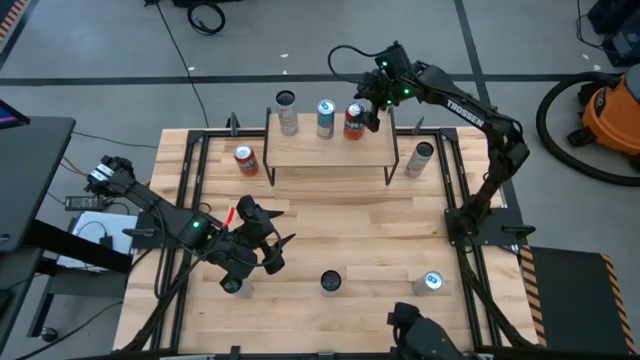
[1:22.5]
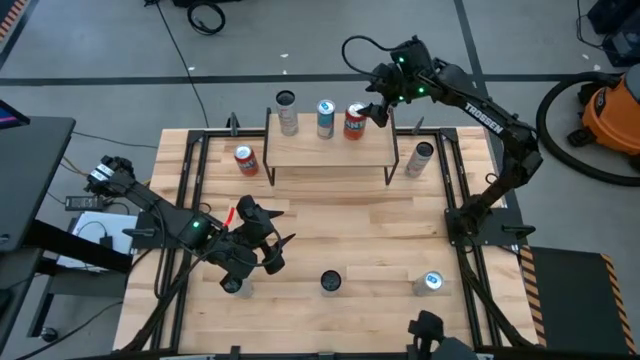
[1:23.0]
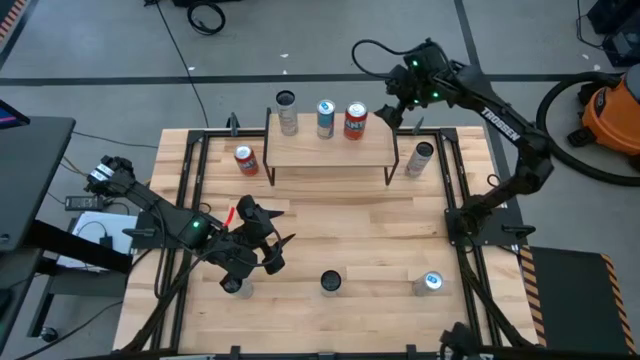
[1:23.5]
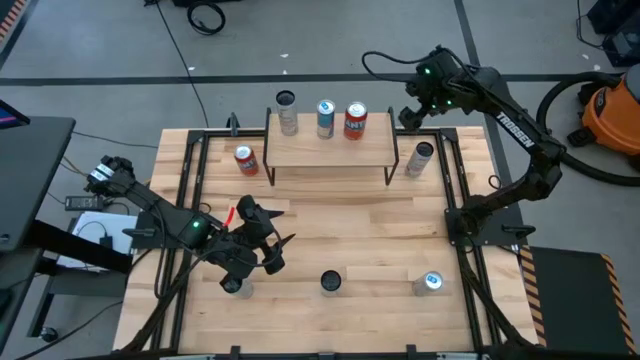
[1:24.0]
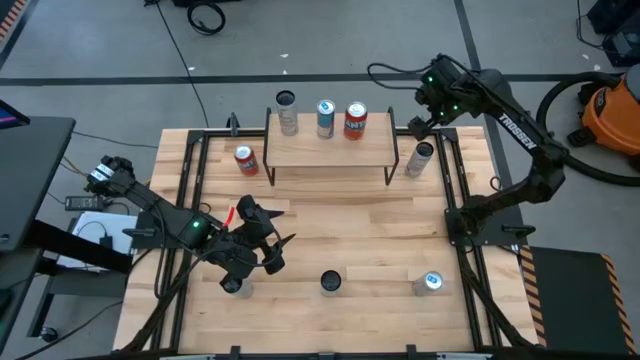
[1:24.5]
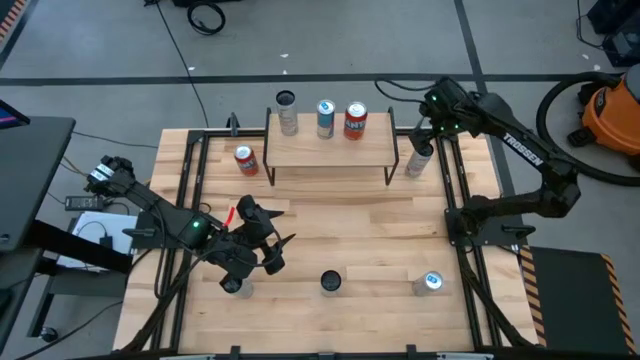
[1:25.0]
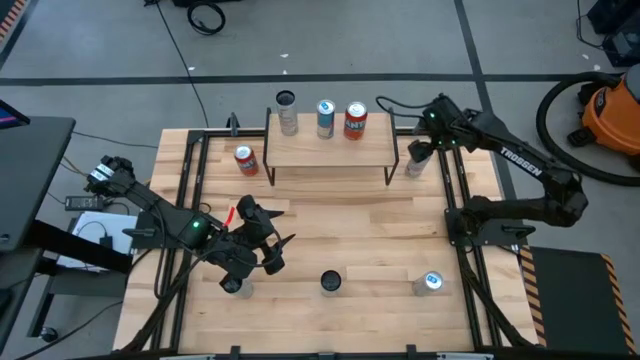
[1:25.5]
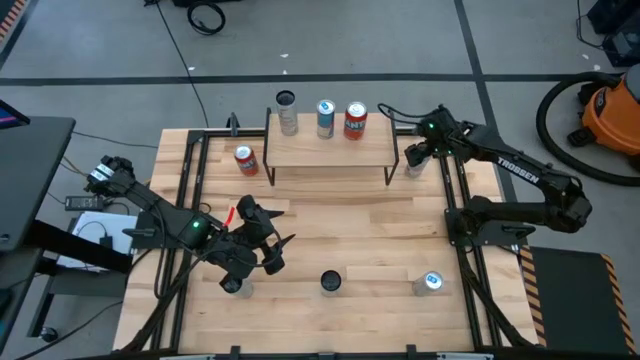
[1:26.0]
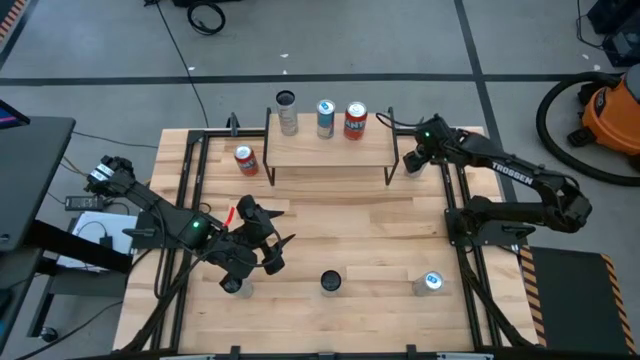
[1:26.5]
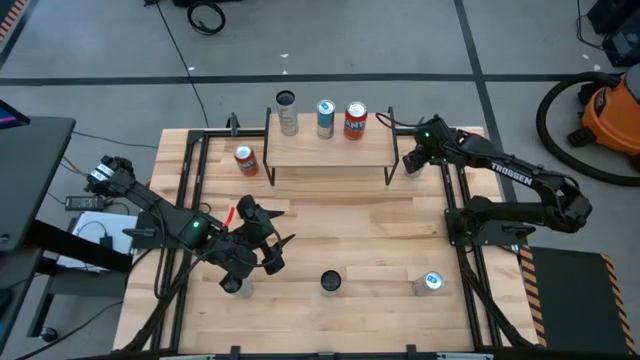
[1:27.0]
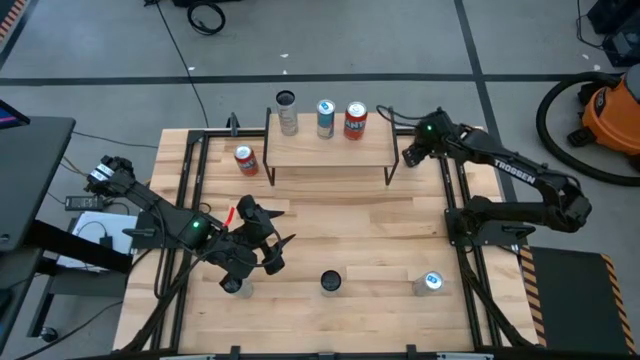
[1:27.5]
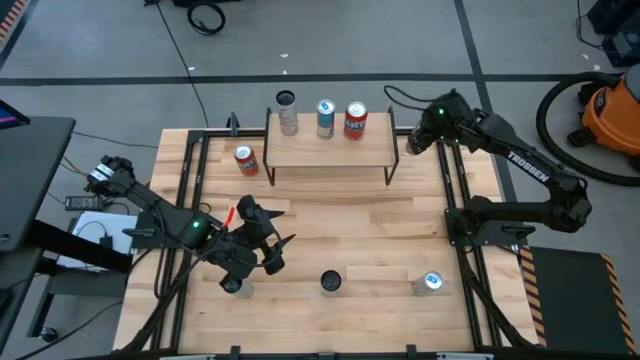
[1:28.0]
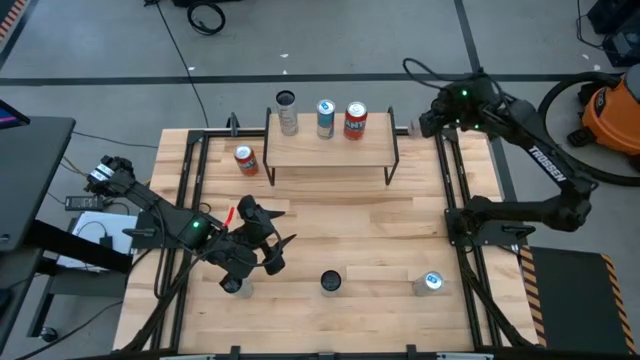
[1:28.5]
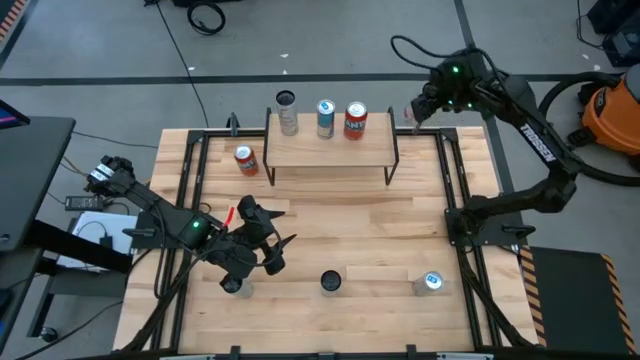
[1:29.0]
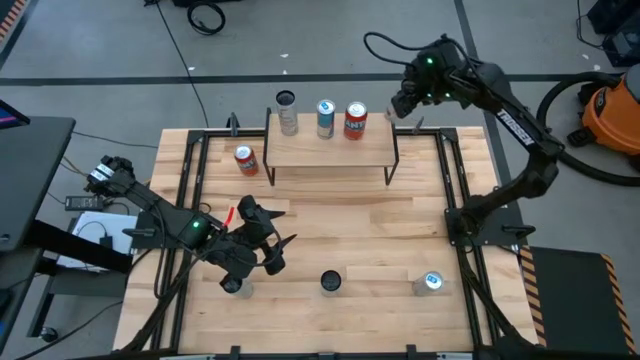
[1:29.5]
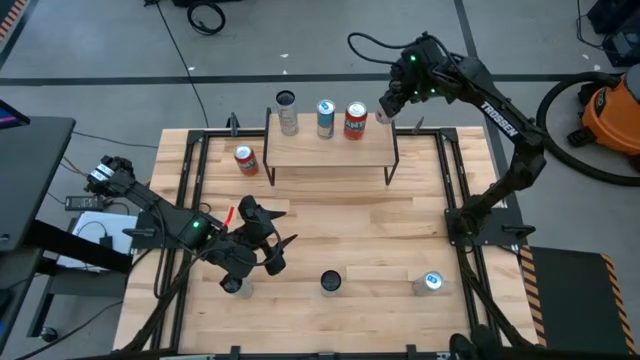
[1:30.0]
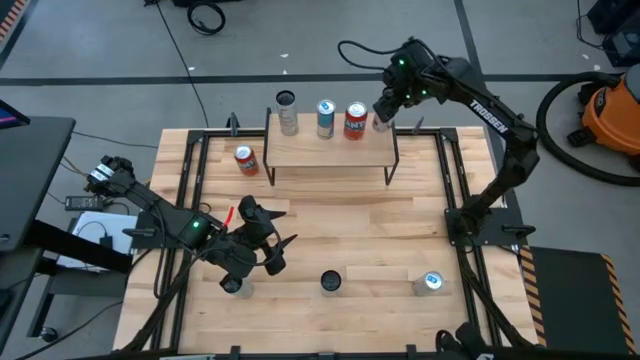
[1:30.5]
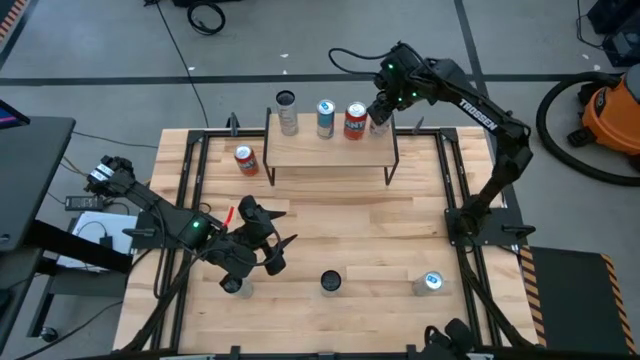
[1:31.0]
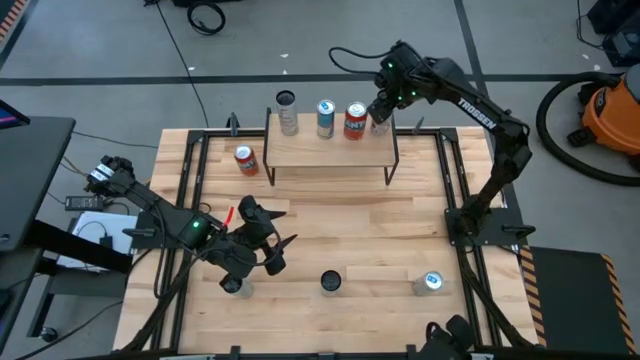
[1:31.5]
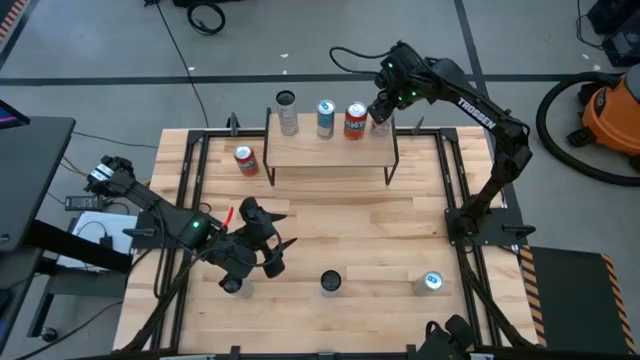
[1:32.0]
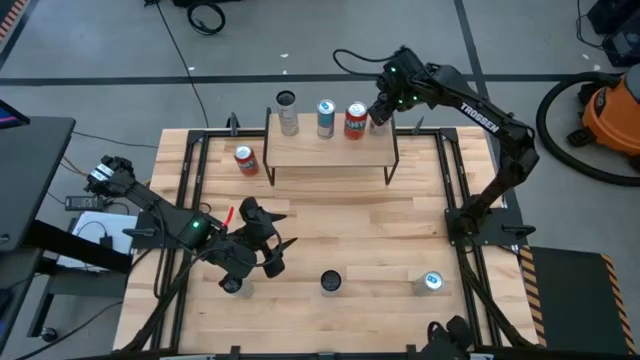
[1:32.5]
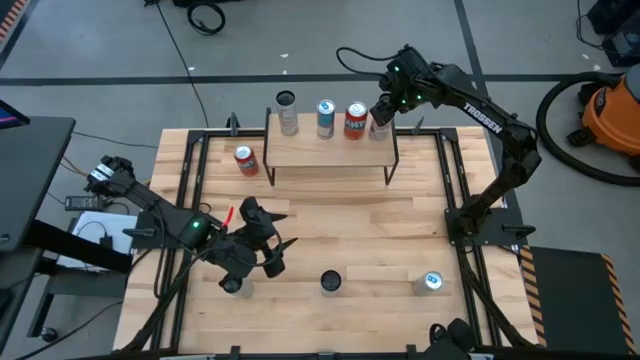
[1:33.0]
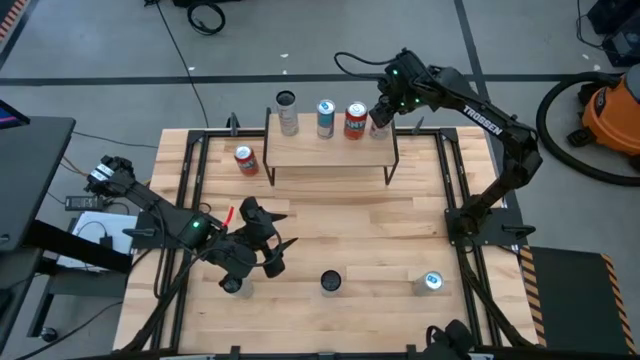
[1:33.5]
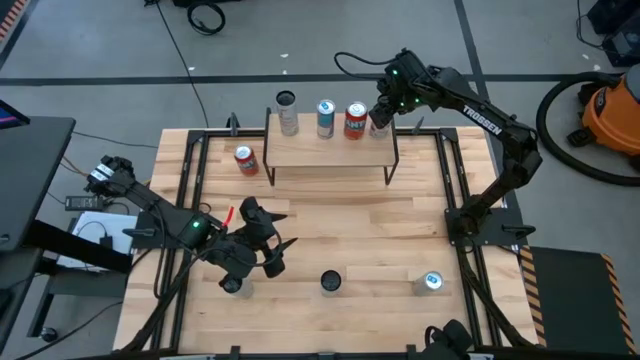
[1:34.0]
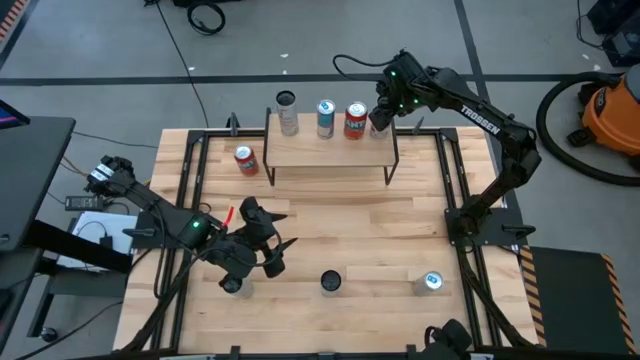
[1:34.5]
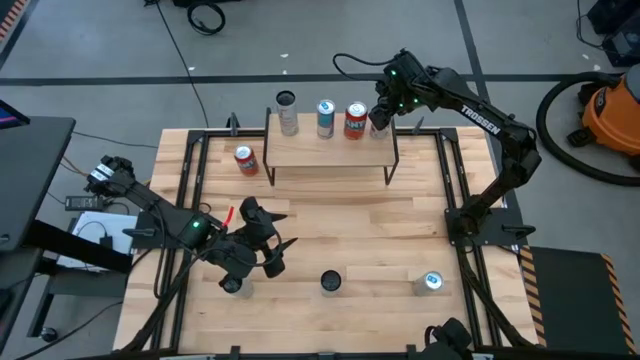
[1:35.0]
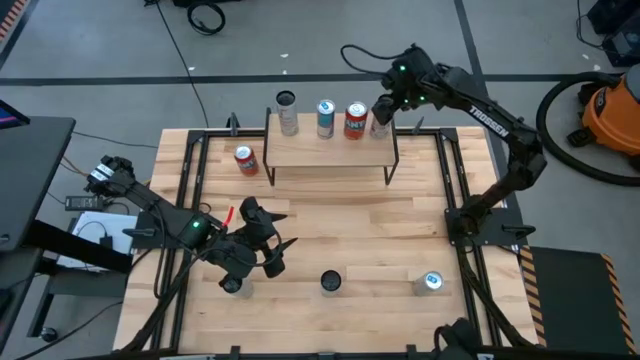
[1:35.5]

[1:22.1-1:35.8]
Task: Place canned beverage on shelf
Put the top white pink soda can on the shelf

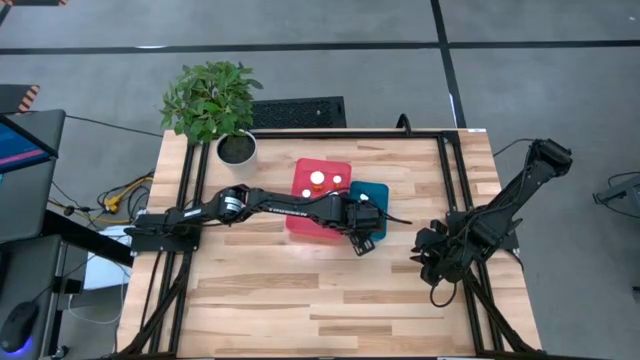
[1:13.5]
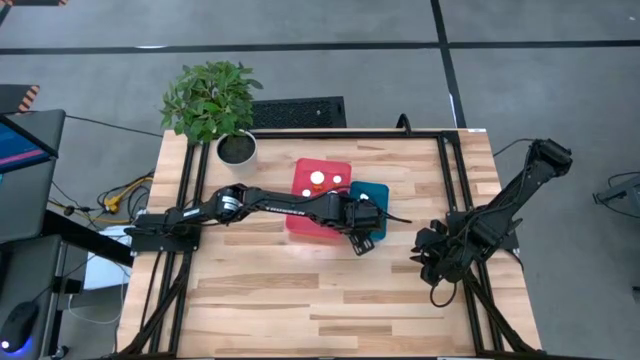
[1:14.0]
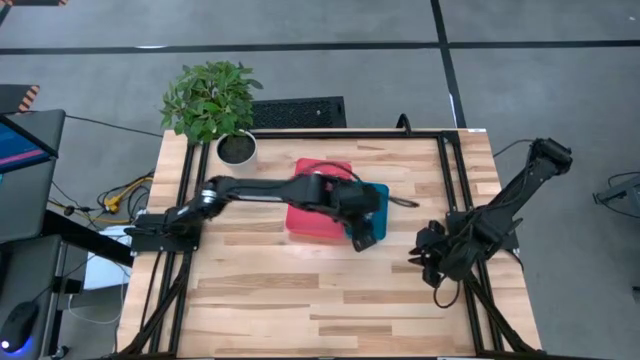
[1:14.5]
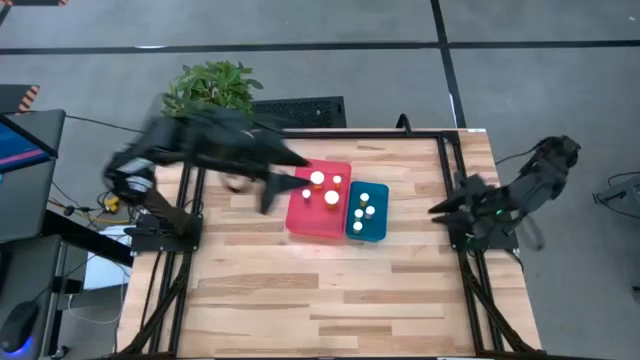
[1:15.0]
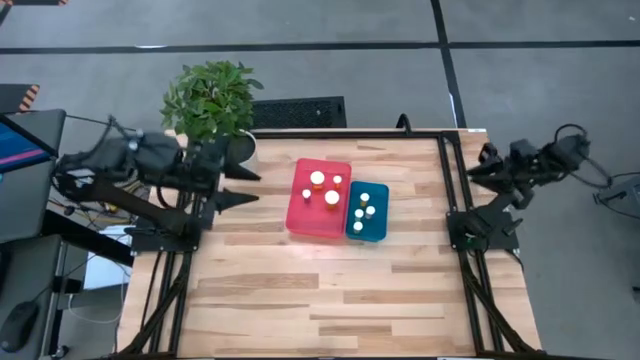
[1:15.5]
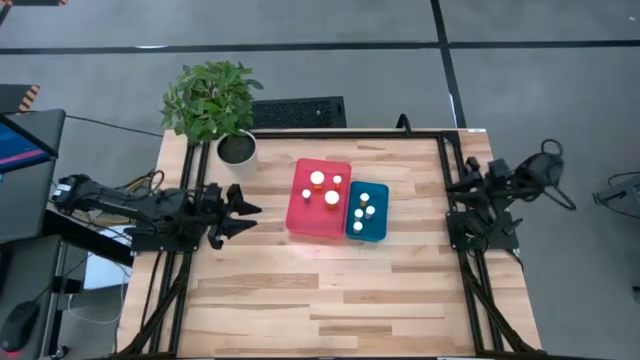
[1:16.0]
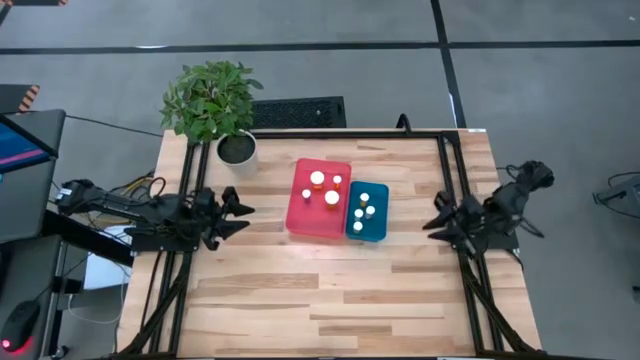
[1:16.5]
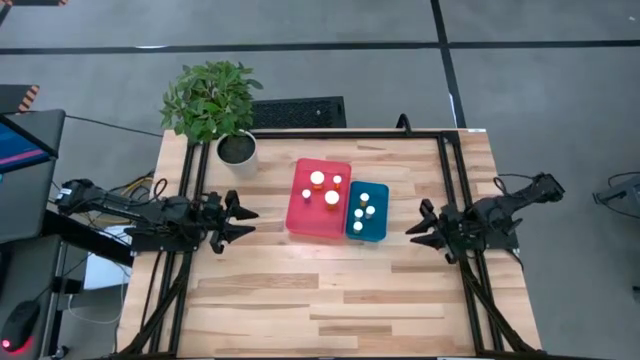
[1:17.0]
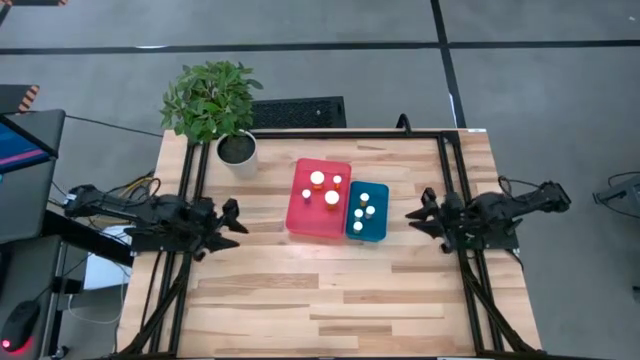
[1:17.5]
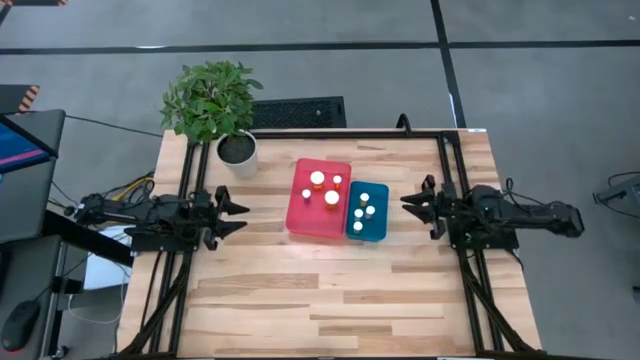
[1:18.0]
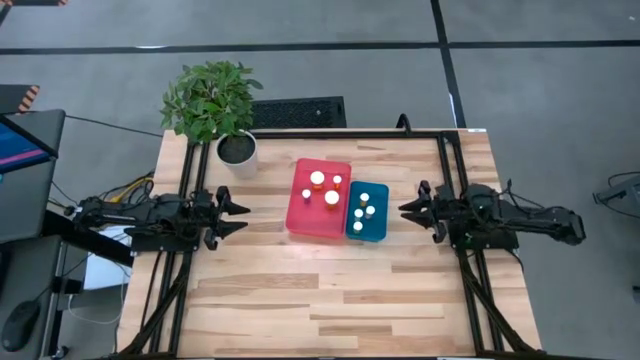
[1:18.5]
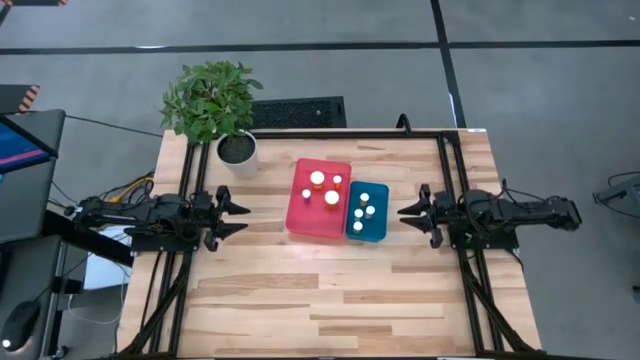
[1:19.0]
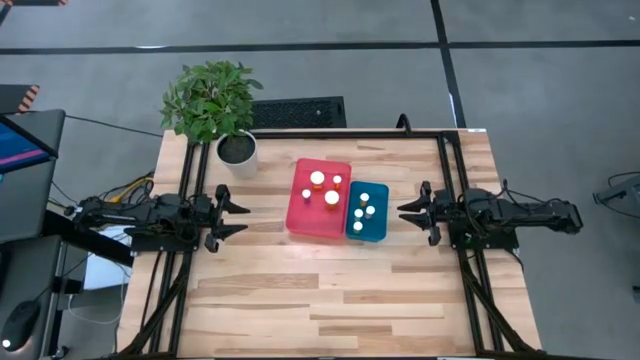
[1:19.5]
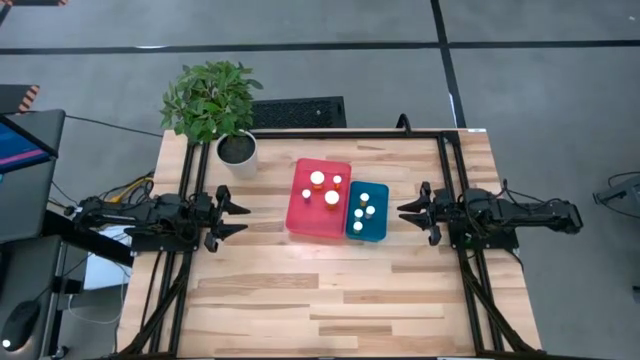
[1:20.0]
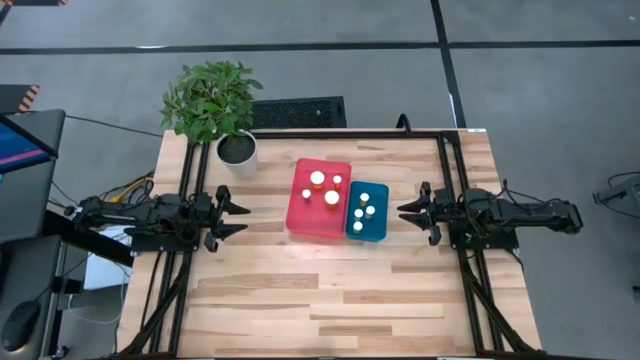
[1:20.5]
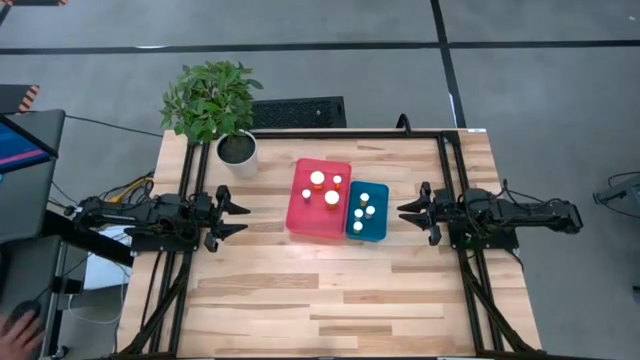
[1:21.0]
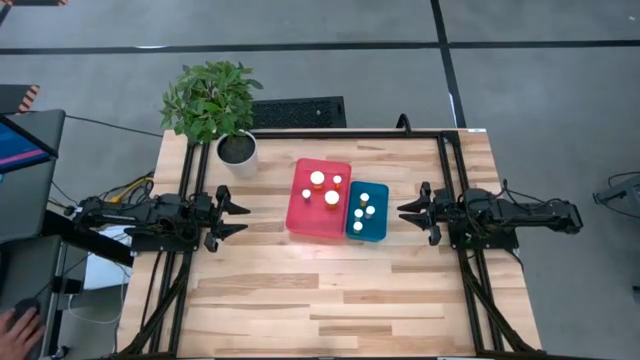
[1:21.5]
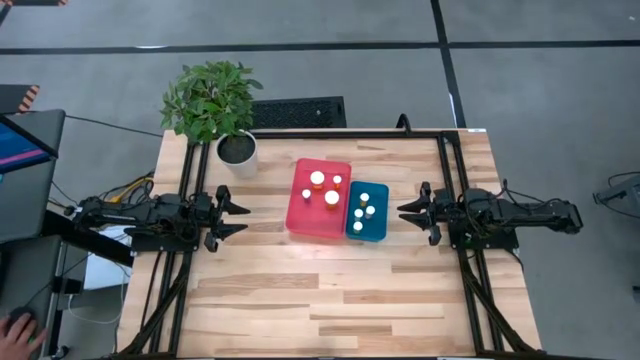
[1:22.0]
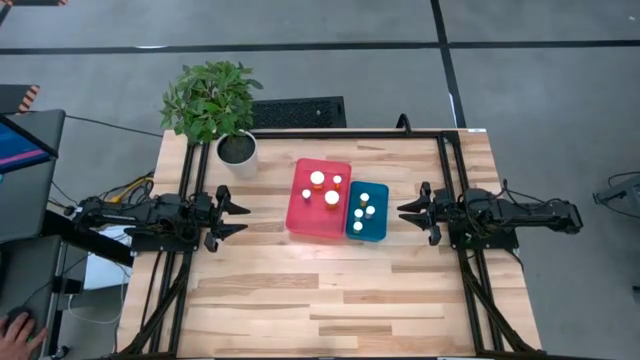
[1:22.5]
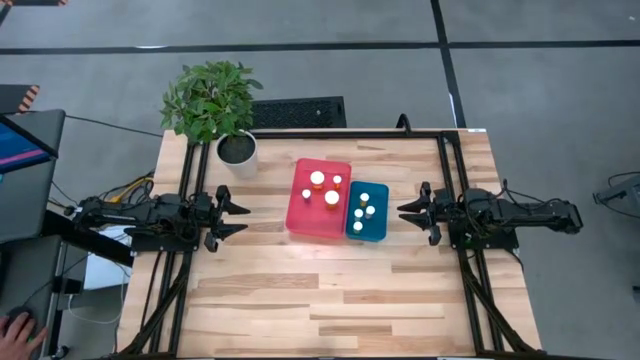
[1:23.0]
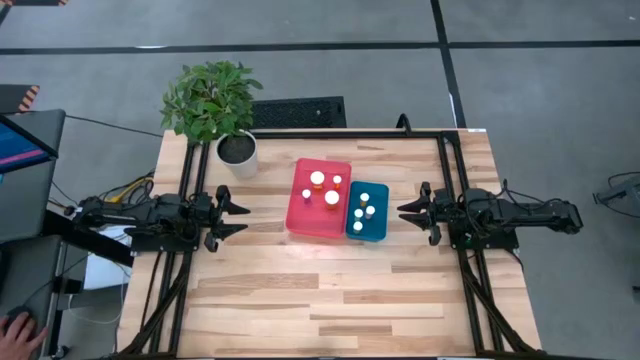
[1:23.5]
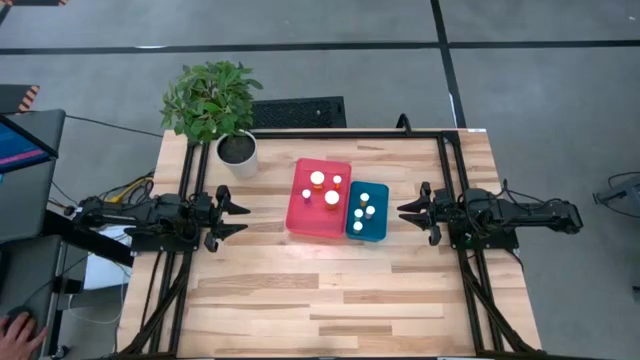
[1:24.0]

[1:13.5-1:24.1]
Task: Pick and place medicine bottles into bin by pill shape (circle, oval)
Return to Home Position
